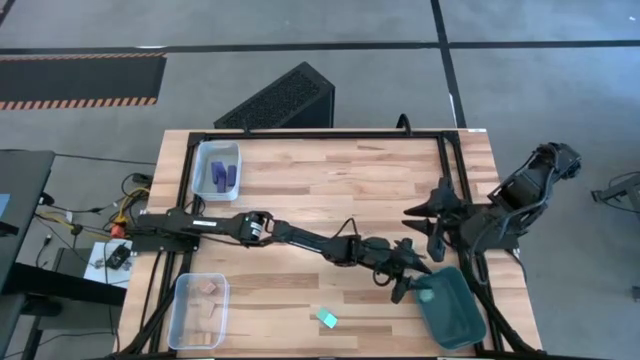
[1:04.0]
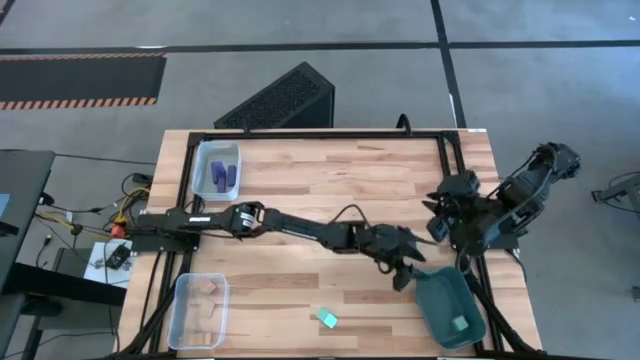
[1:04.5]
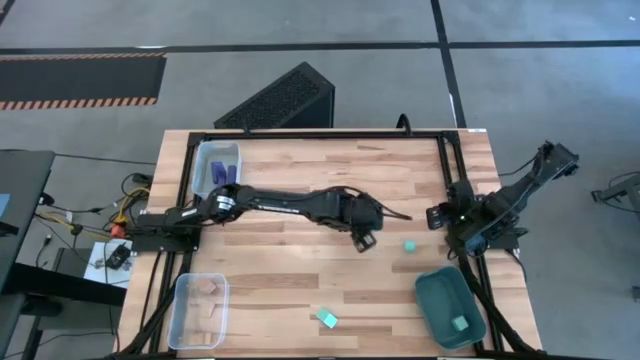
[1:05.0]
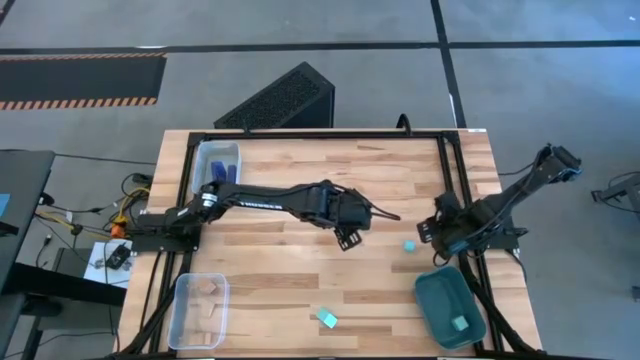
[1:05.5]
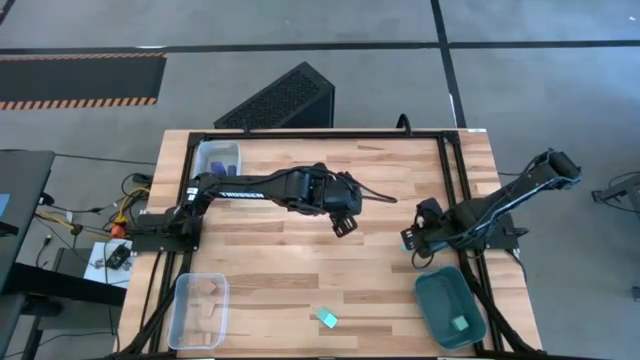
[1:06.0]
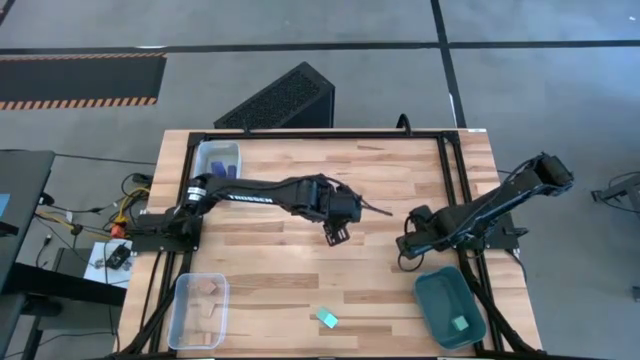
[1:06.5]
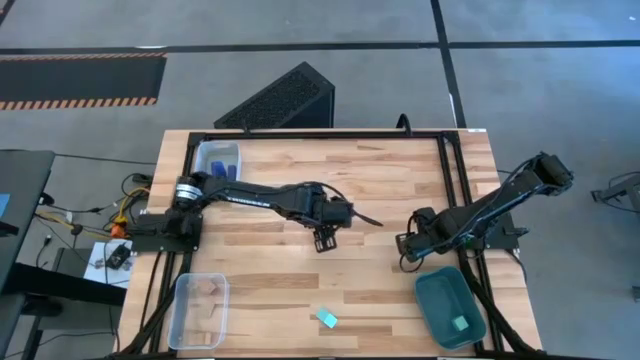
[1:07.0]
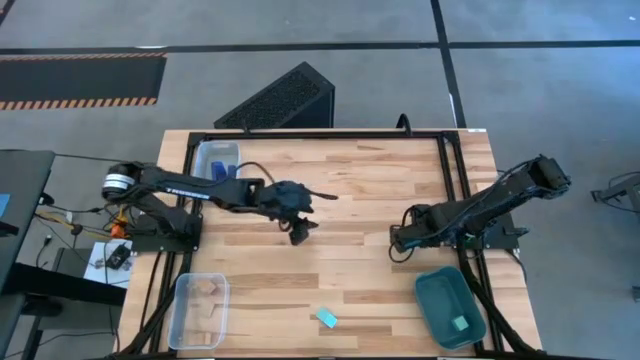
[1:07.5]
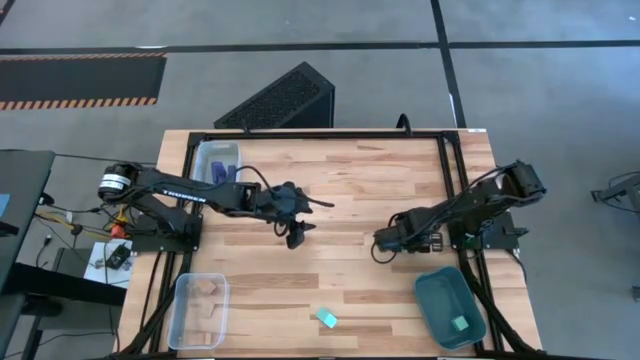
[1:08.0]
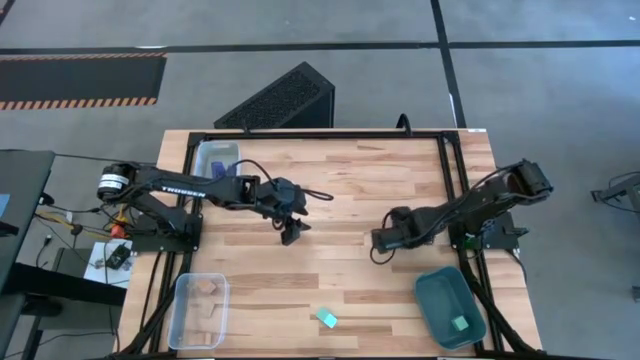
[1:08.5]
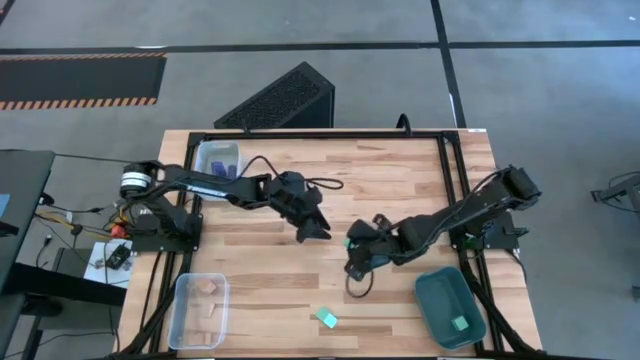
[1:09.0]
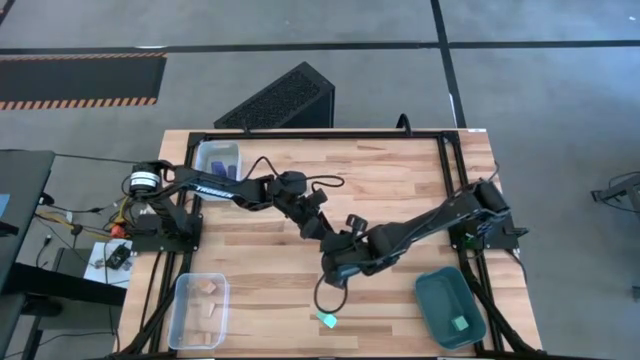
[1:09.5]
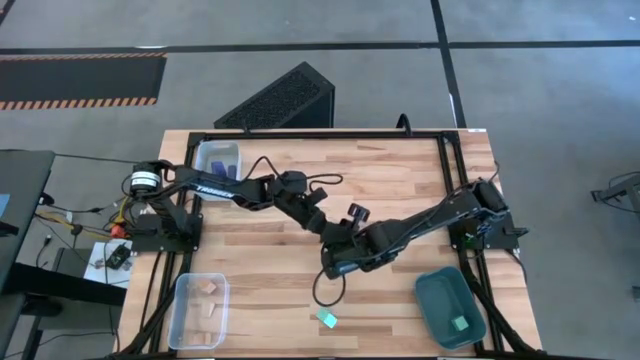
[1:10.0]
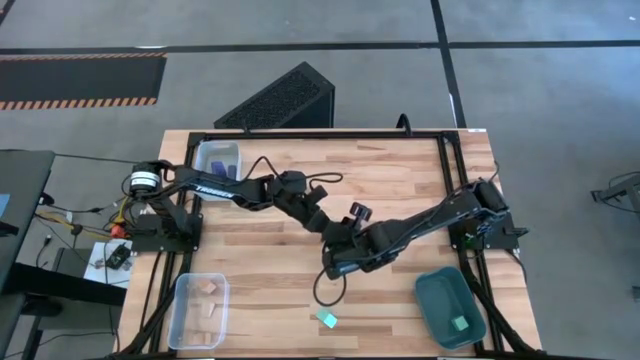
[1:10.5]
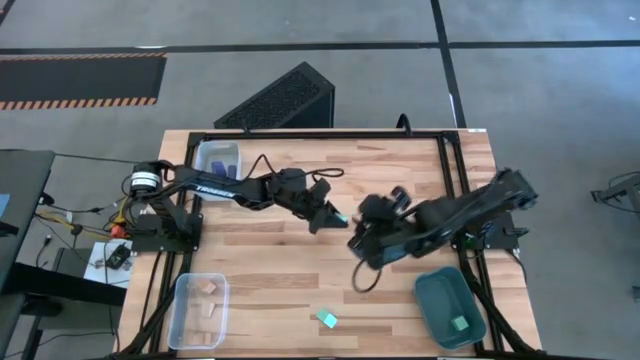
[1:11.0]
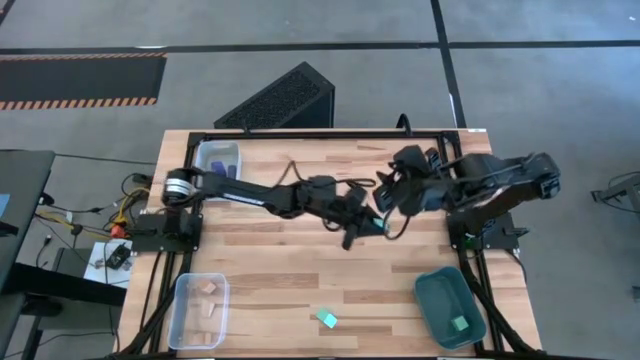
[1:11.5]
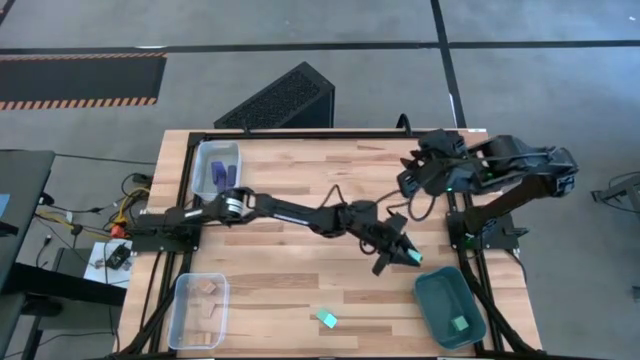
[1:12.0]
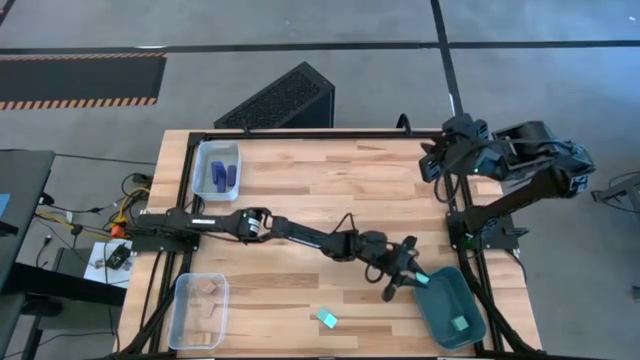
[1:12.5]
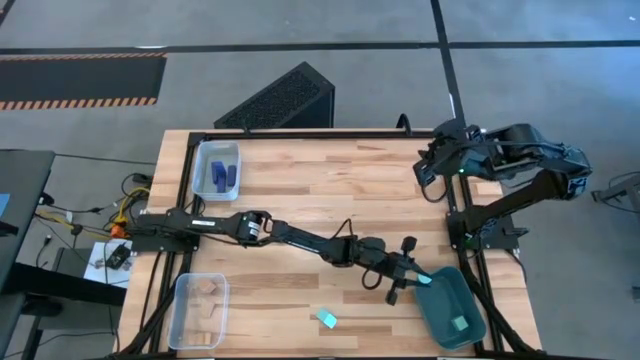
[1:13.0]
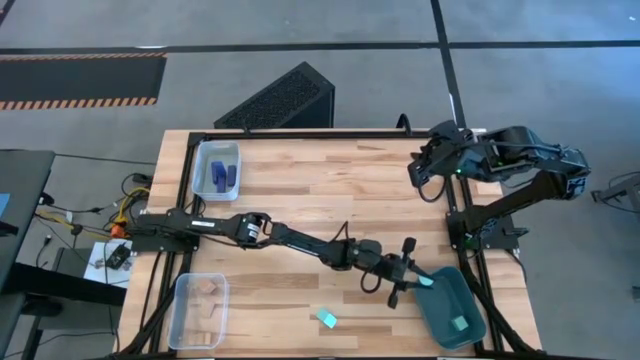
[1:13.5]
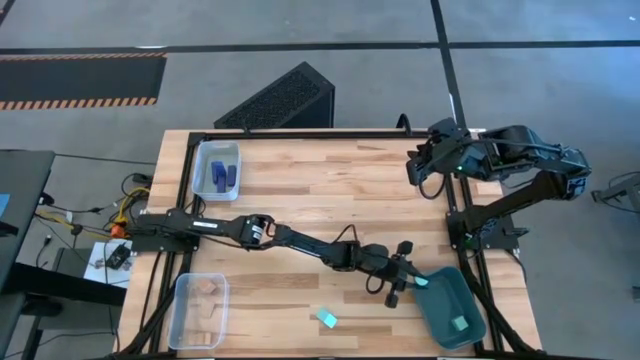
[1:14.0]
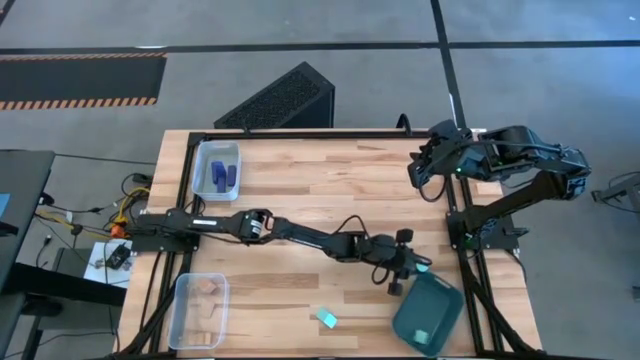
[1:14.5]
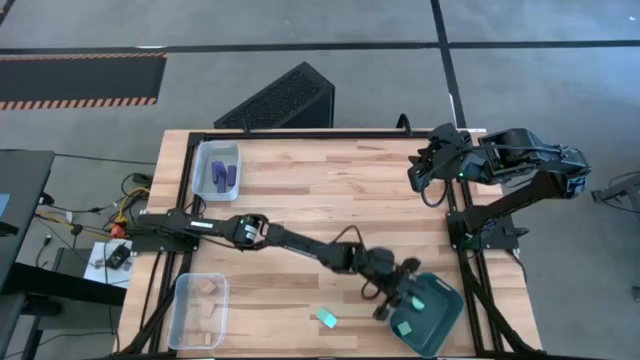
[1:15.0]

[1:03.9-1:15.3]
Task: Sort & place blocks by color
Put the top blue block into the green bin

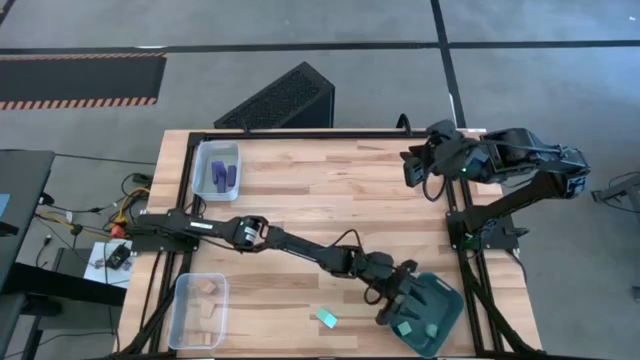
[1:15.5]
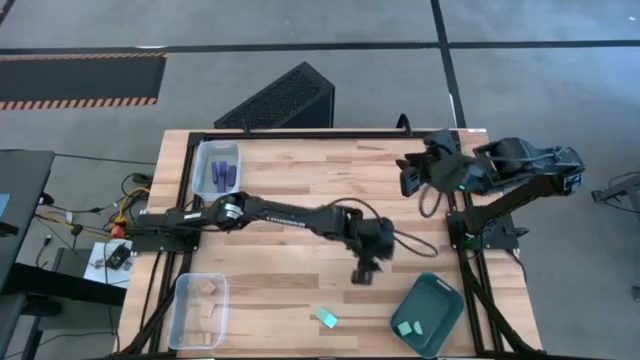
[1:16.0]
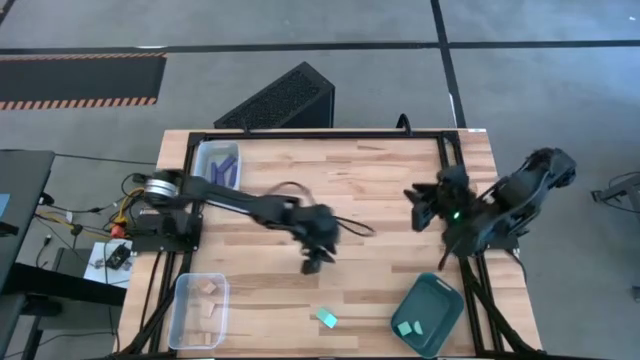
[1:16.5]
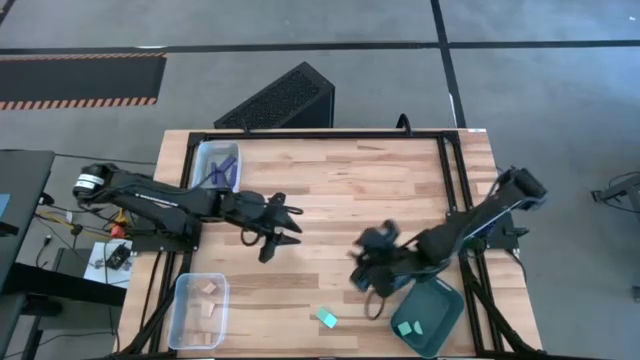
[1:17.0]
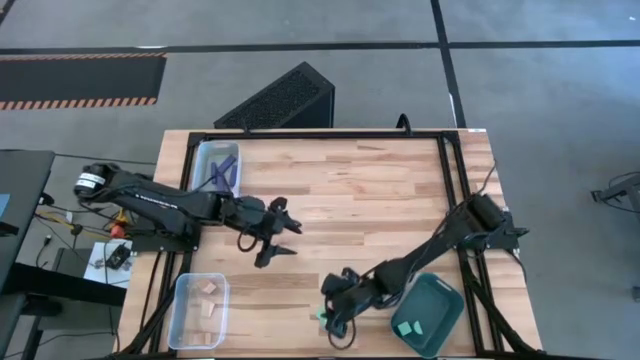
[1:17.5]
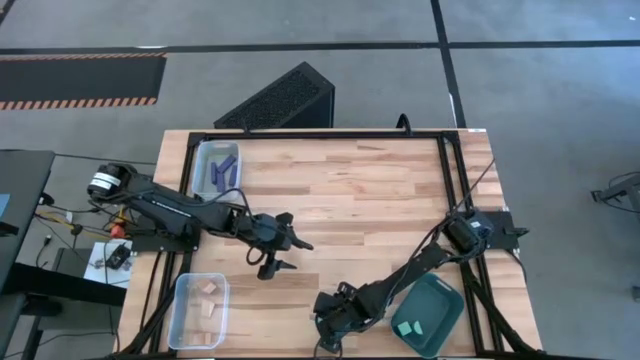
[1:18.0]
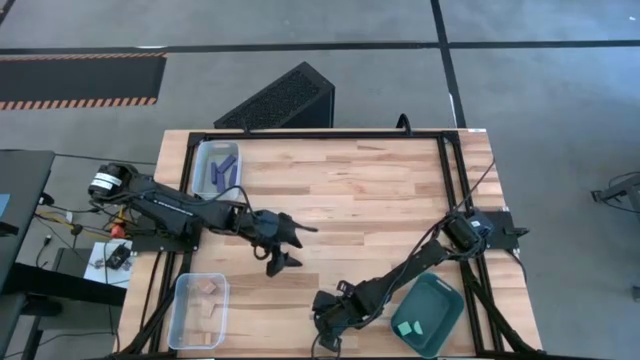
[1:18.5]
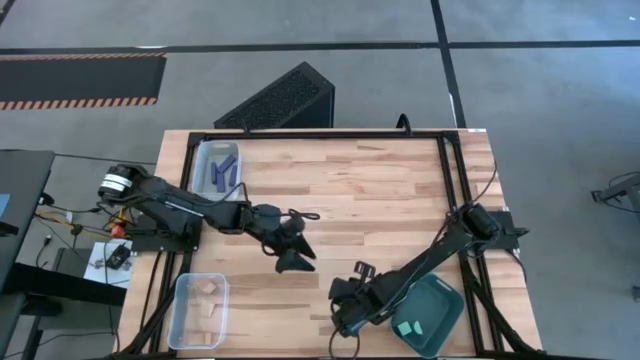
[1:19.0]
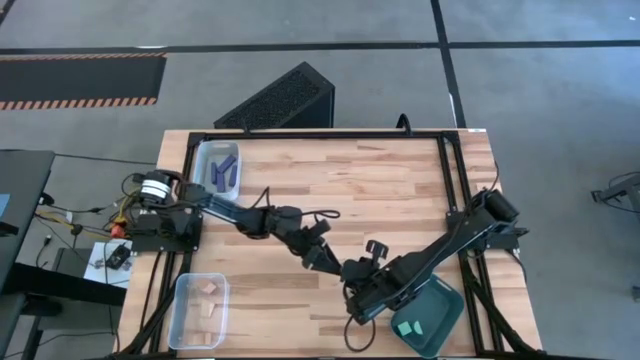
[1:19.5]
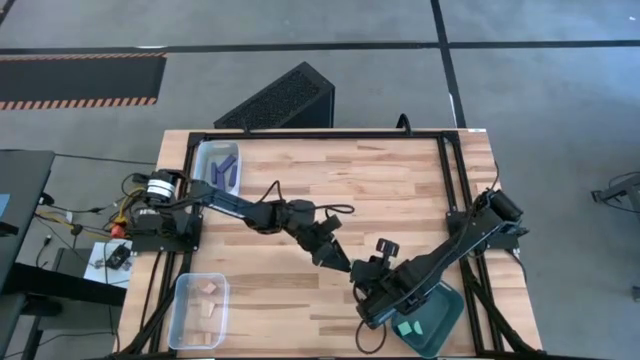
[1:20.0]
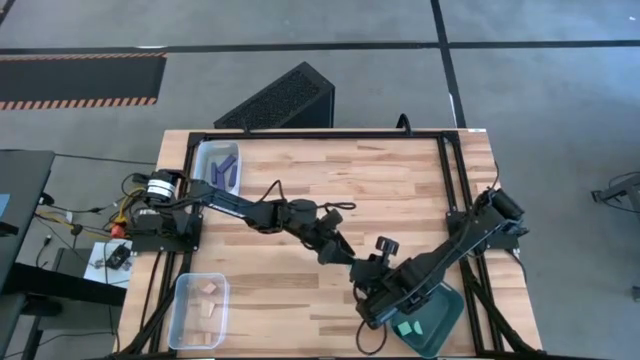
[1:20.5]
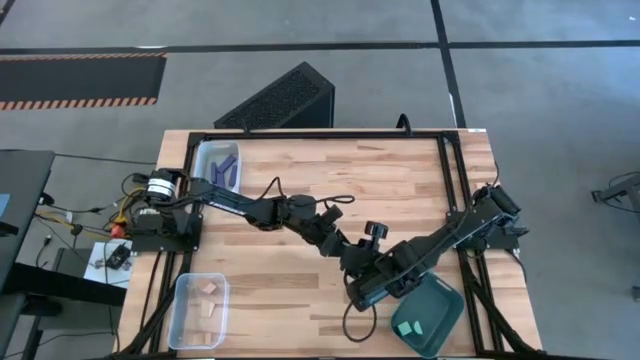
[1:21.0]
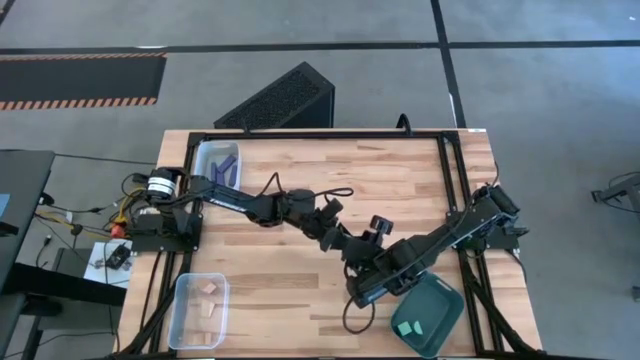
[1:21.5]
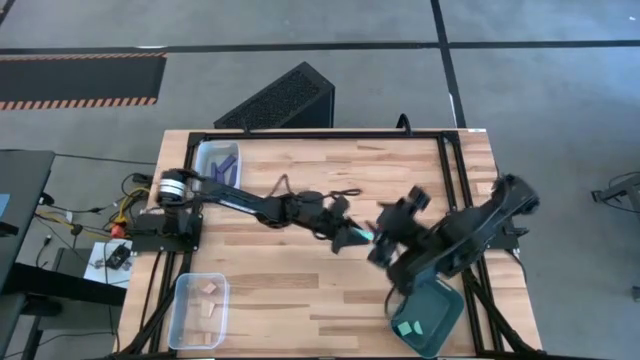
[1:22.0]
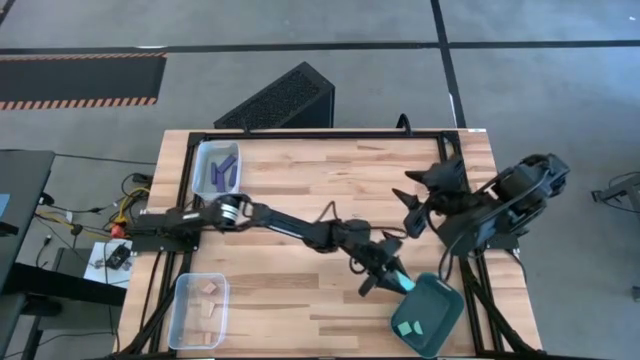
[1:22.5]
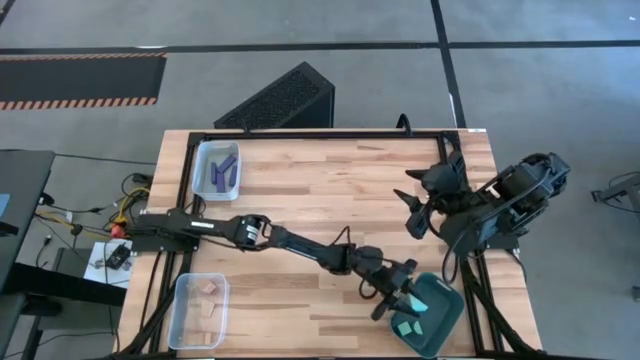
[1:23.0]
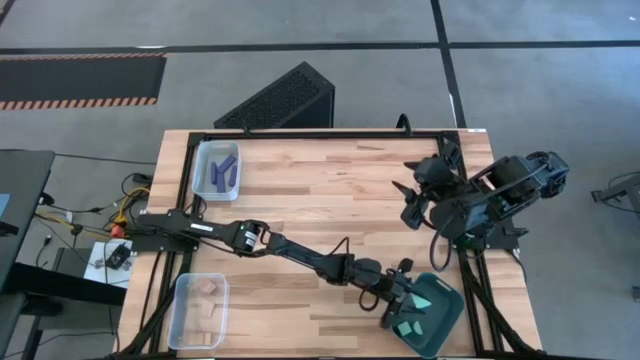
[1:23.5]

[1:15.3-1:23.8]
Put the blue block into the green bin

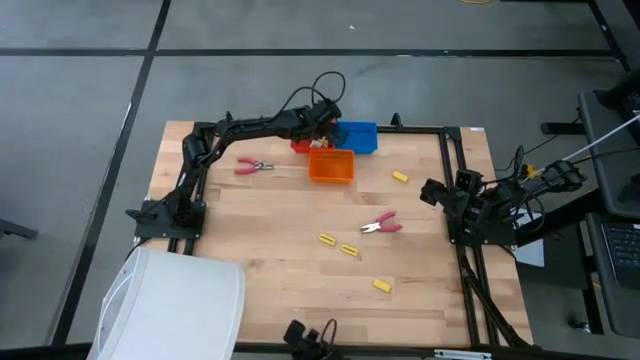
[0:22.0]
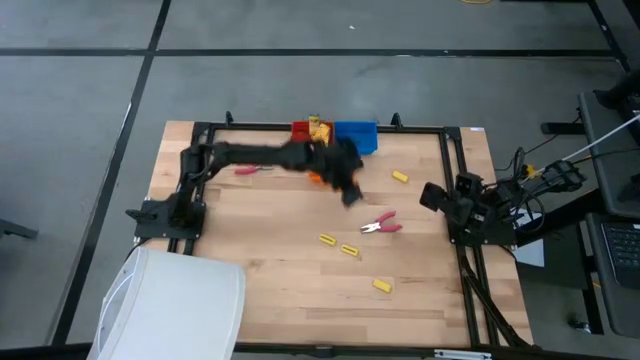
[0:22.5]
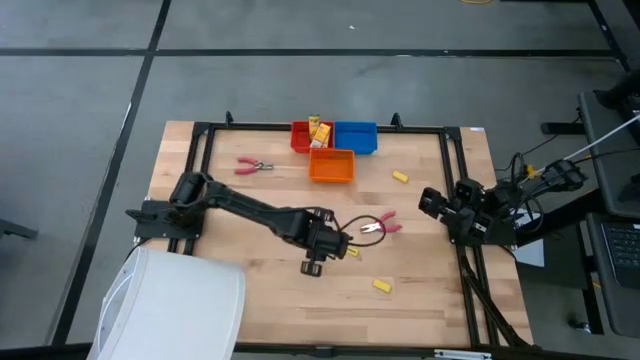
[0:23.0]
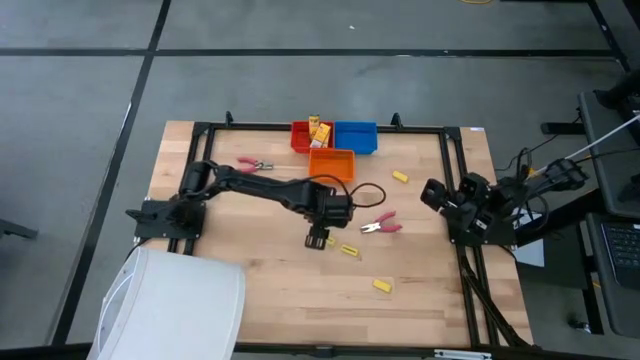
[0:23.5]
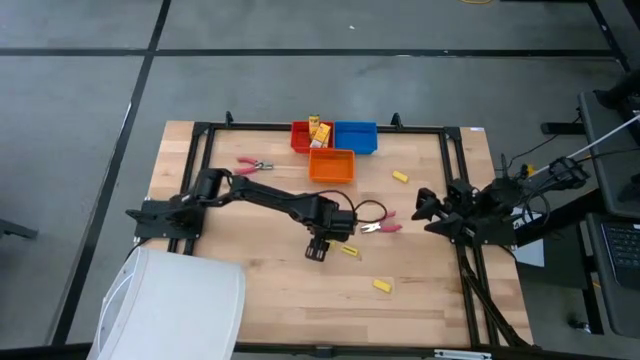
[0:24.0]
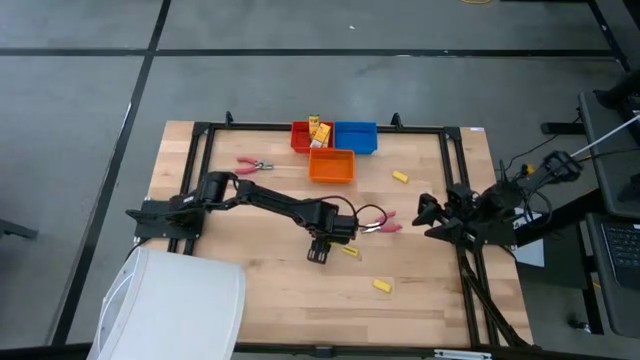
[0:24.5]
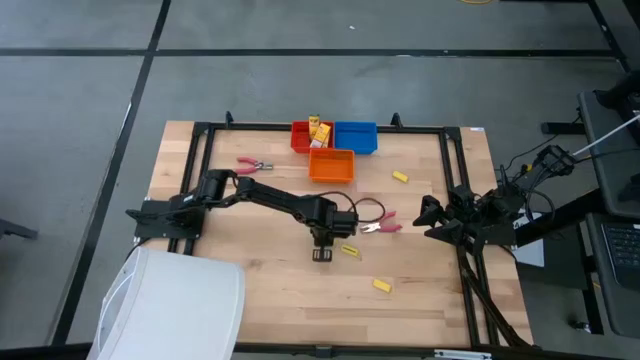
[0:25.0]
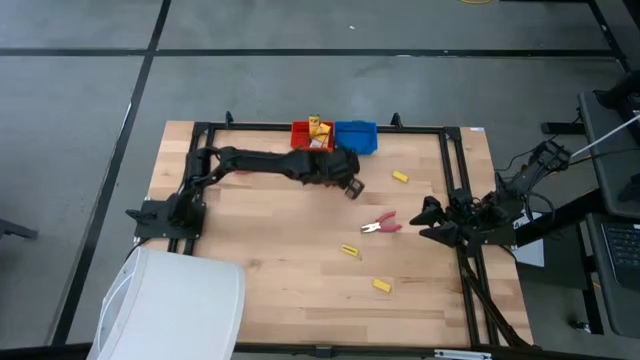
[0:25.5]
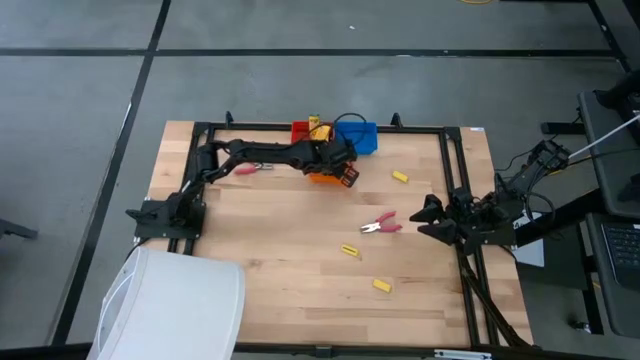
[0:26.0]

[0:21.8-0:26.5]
Task: Pick & Place School Supplies
Put the yellow eraser into the orange bin
